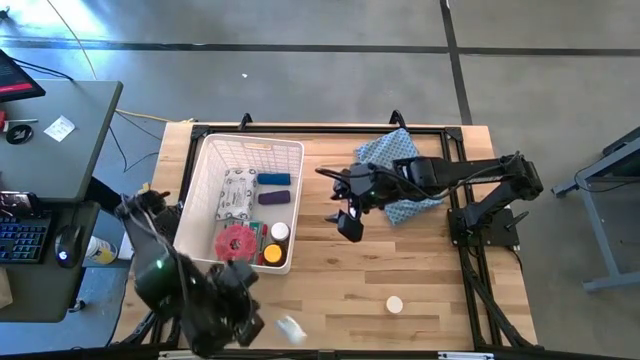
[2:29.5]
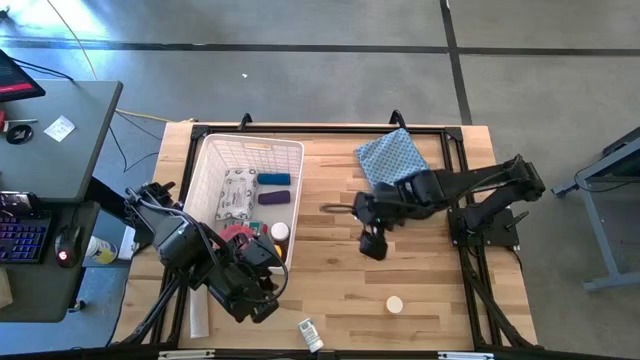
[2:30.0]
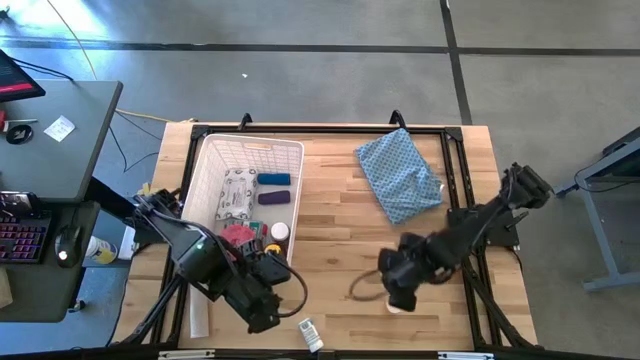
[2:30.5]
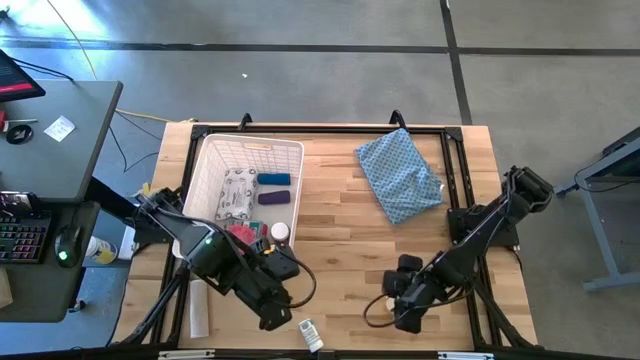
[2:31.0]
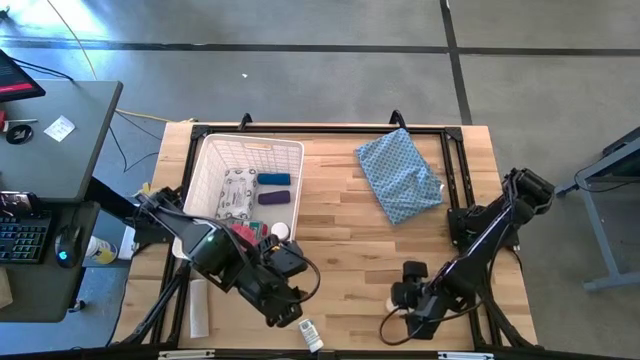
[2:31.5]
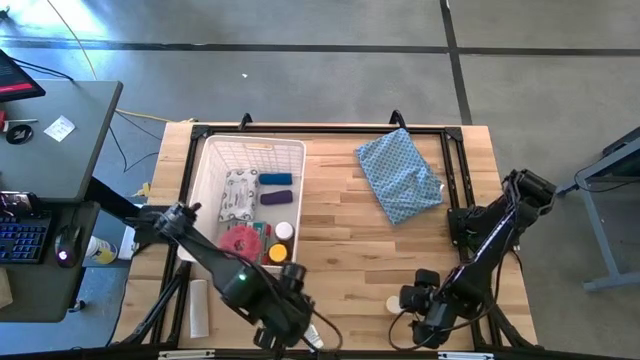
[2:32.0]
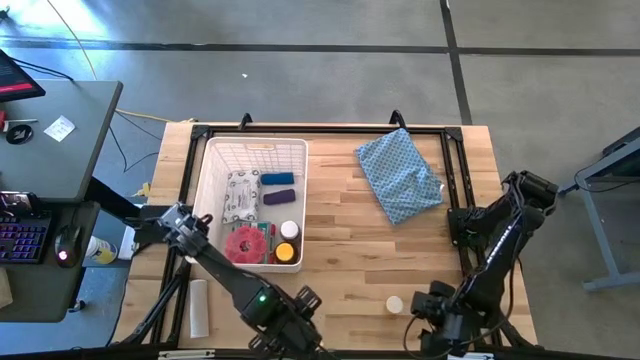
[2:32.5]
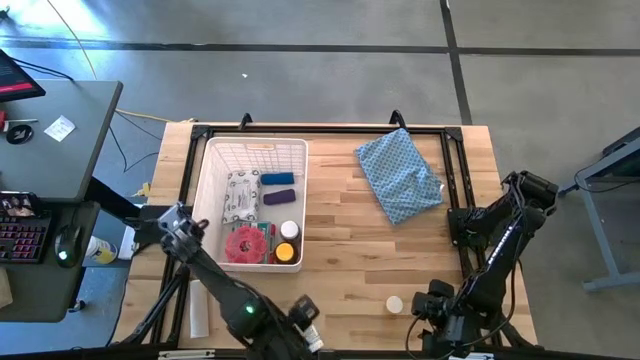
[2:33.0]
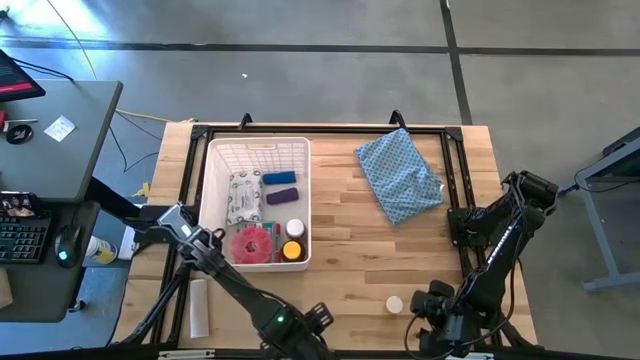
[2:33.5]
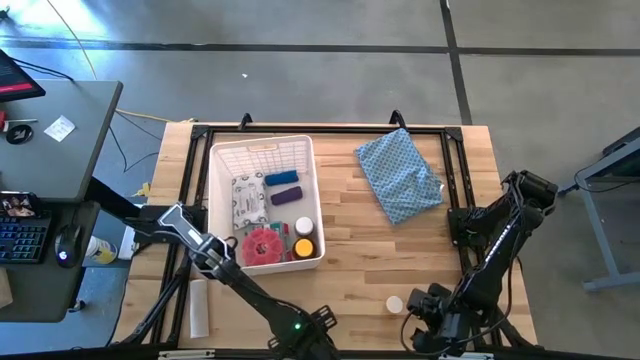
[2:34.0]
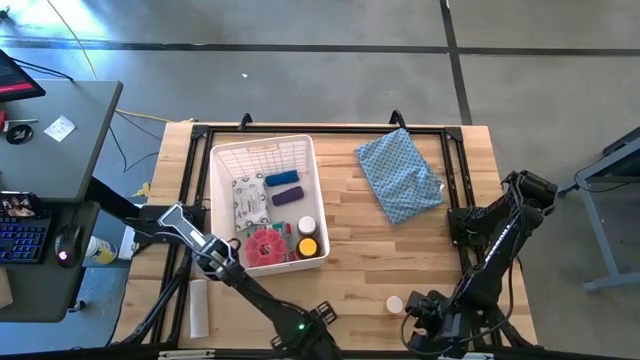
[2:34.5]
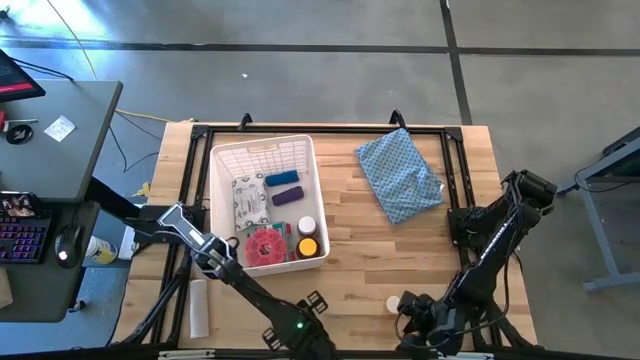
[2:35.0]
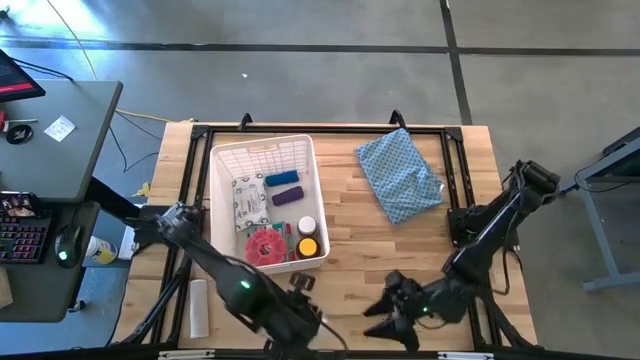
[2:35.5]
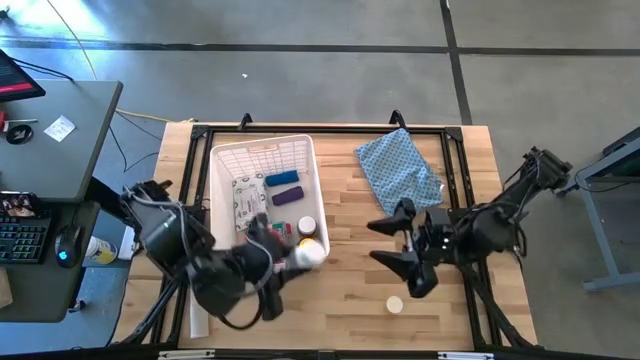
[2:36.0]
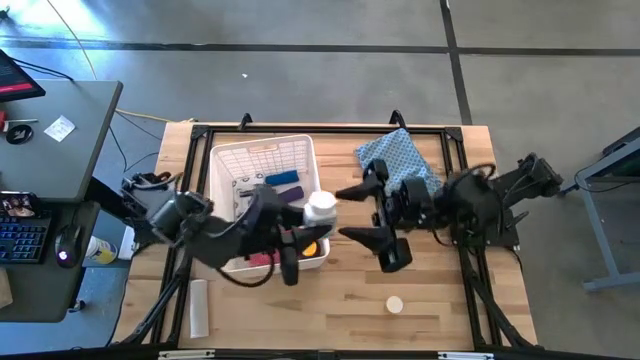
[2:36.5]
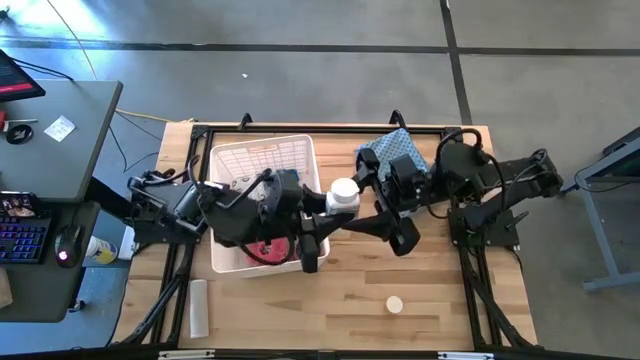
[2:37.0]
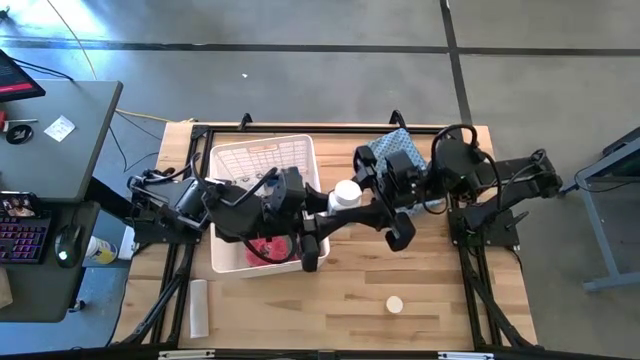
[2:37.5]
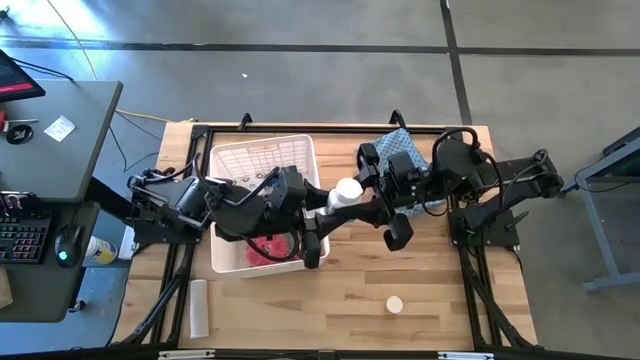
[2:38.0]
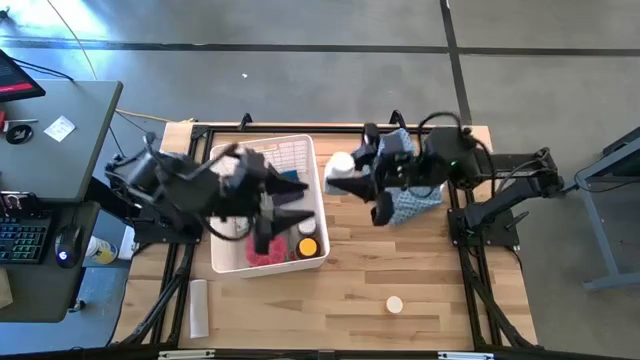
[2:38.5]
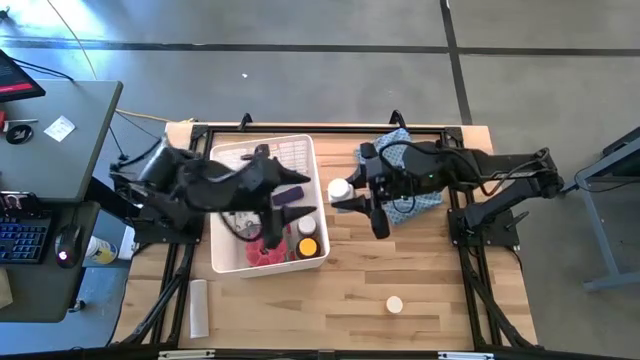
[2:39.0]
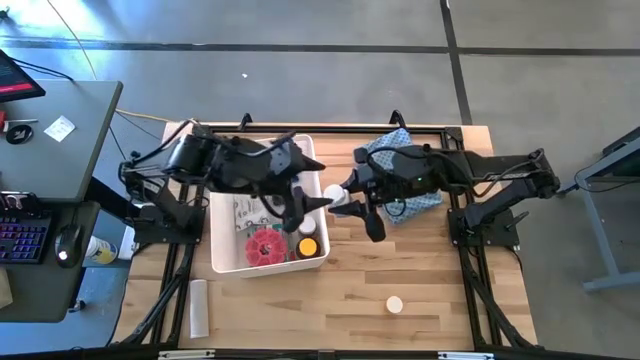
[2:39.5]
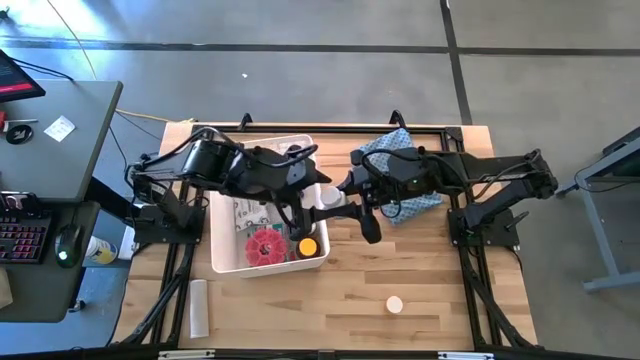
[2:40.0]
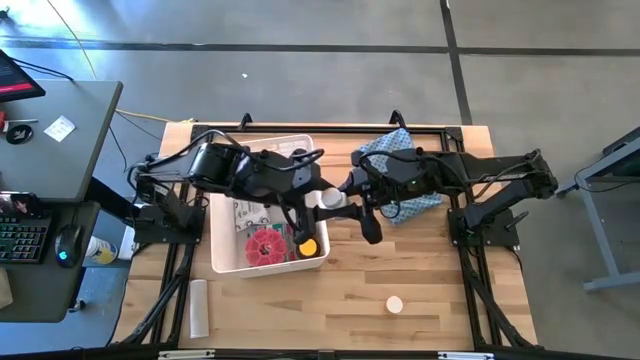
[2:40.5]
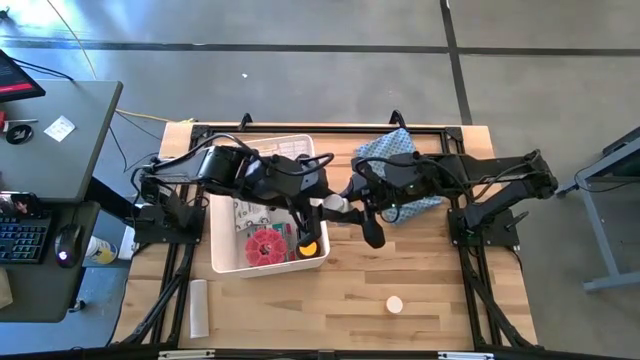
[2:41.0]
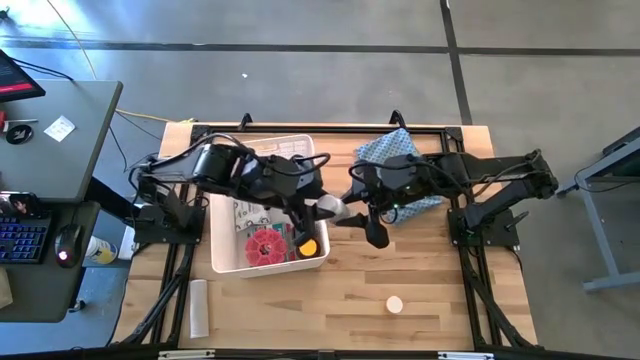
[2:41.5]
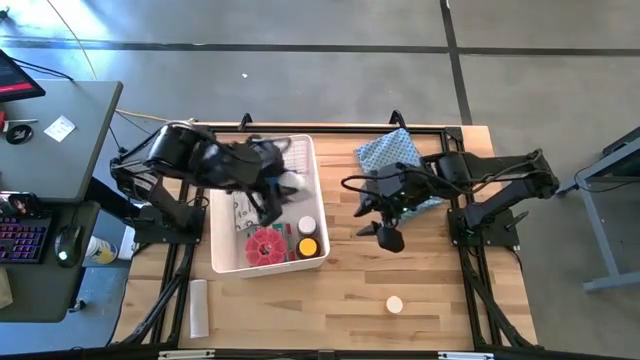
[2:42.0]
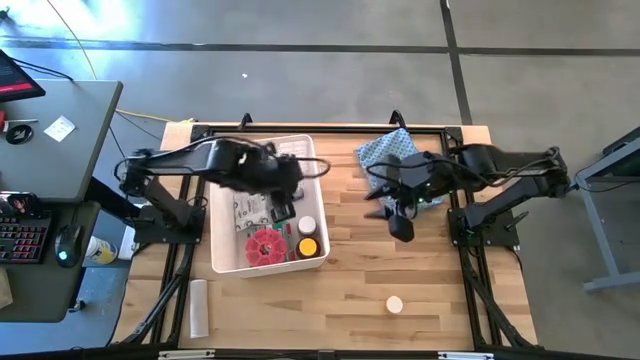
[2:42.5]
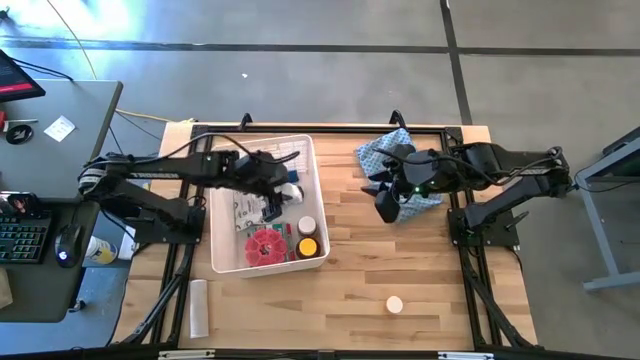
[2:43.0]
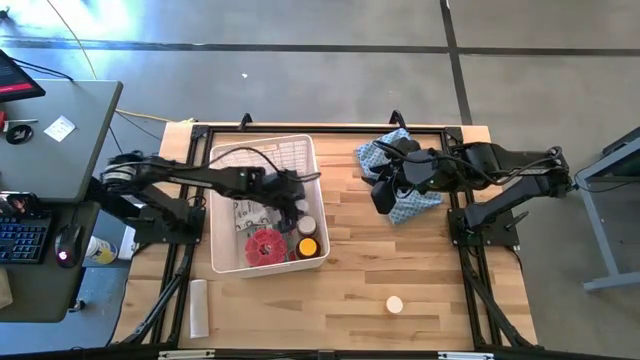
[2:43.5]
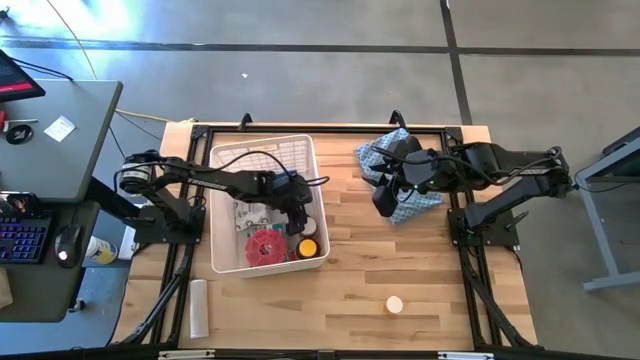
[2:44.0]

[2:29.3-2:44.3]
Task: Pick & place medical supplies in basket/bin
Put the white medicine bottle into the white bin

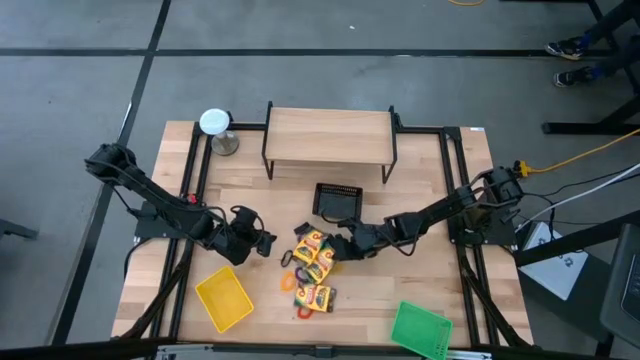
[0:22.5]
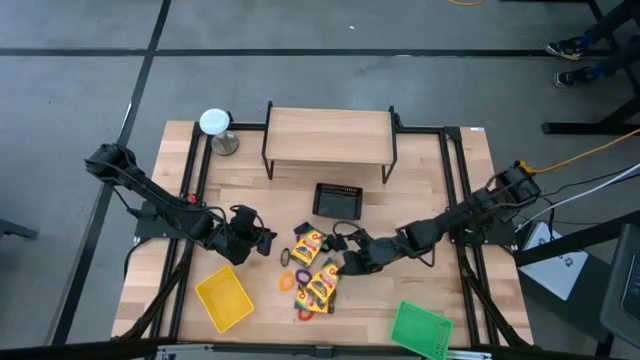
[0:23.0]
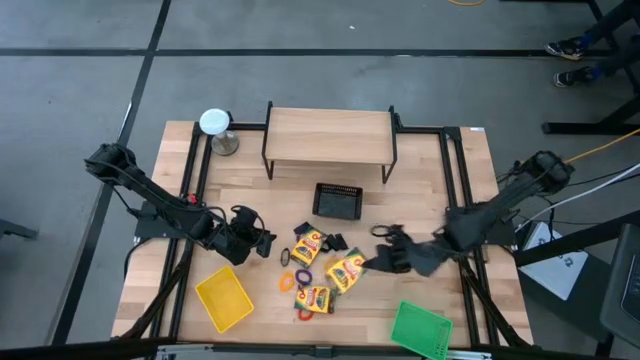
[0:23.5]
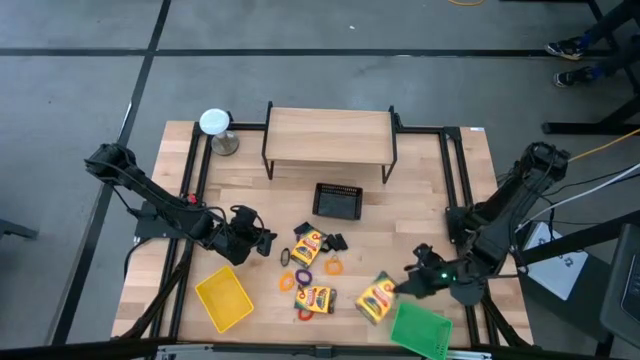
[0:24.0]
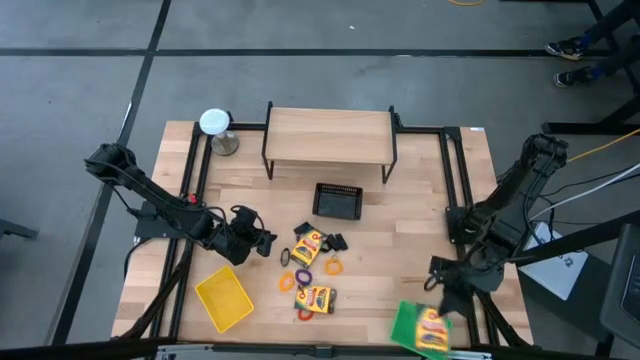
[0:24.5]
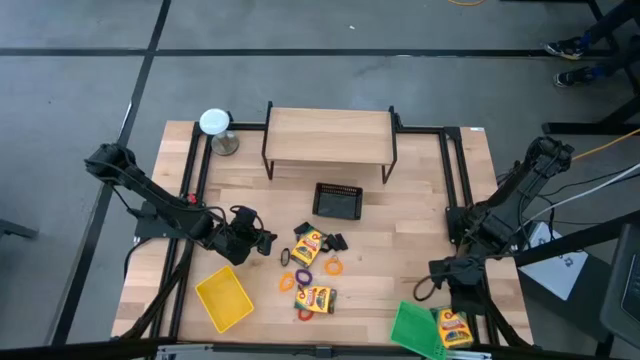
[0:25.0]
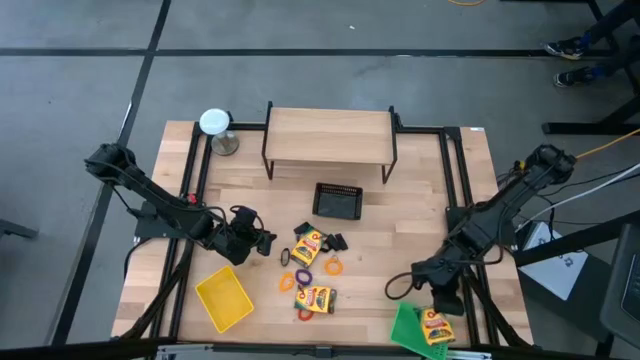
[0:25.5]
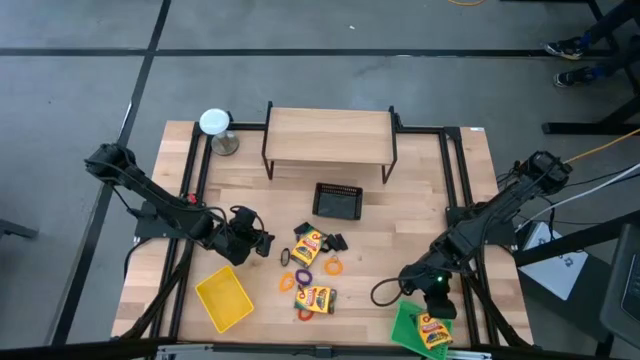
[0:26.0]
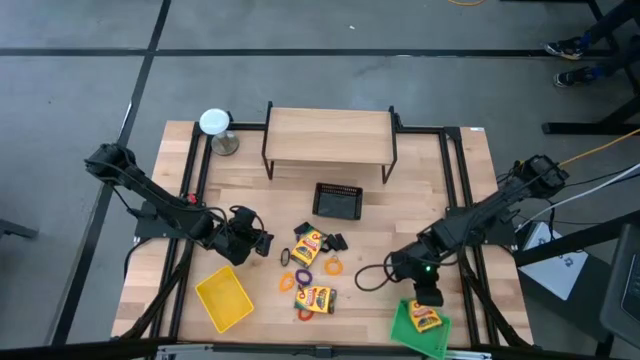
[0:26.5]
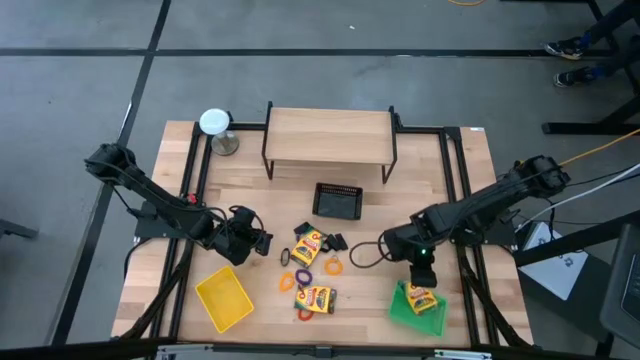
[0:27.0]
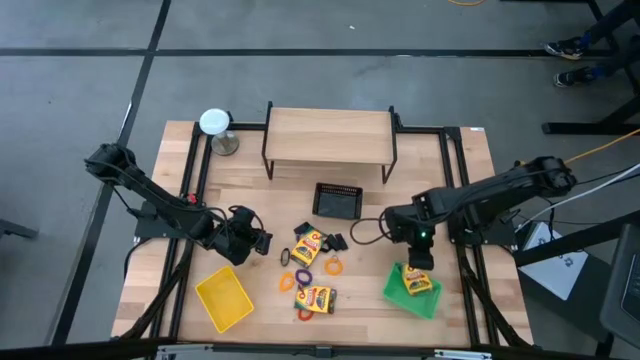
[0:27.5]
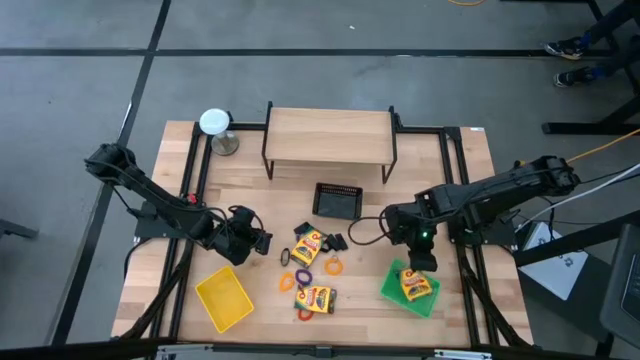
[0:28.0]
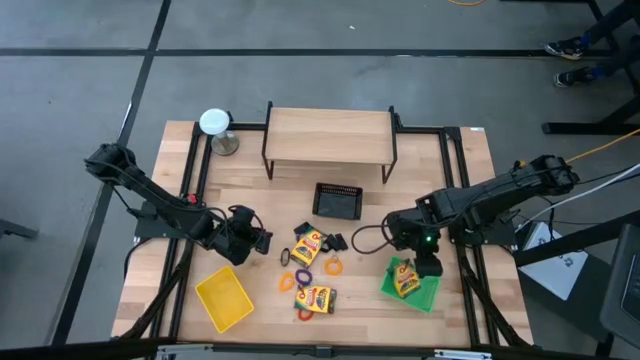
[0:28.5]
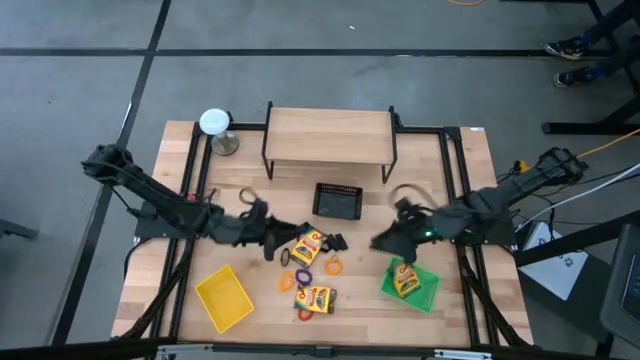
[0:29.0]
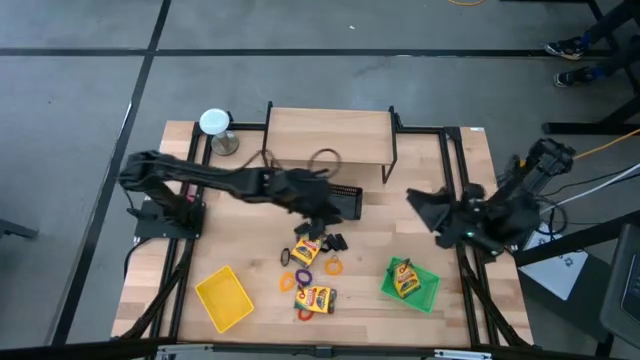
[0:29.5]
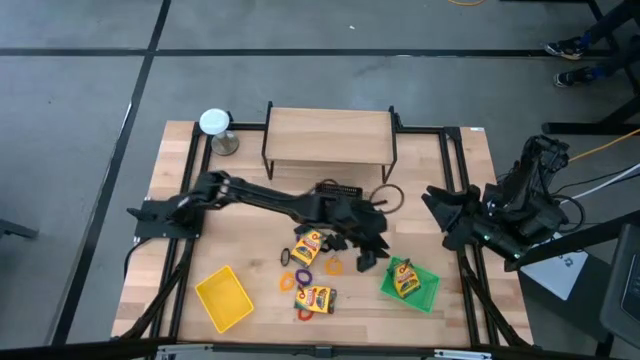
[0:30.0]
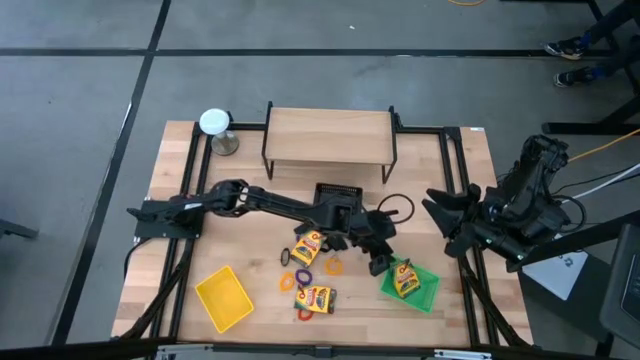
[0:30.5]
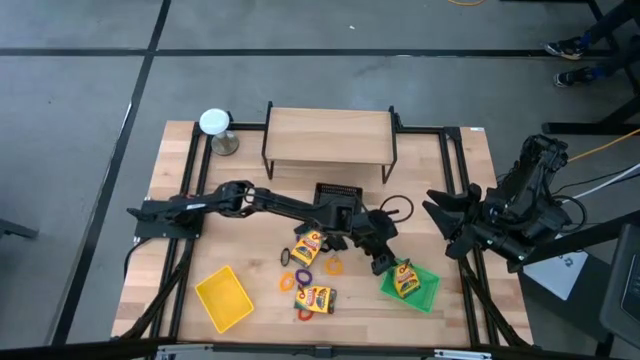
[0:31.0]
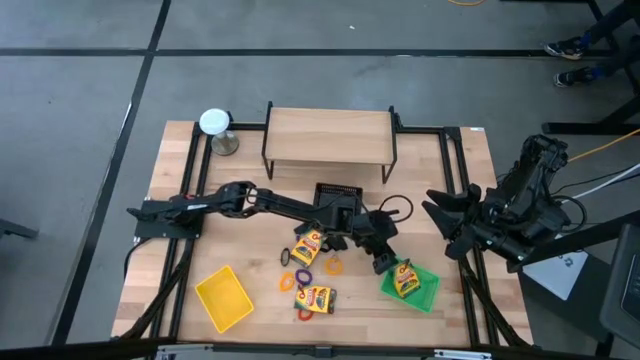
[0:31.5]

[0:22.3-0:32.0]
Task: Pick & Place Office Desk Supplies
Put the middle crayon box into the green basket
